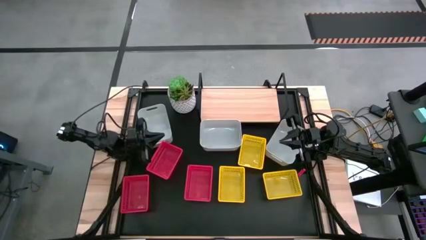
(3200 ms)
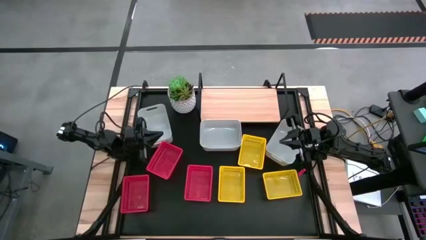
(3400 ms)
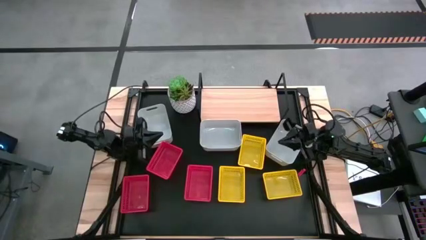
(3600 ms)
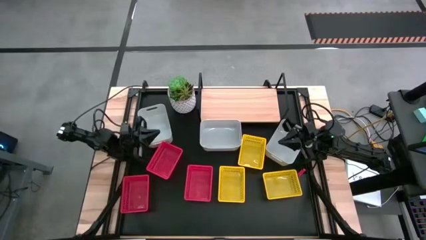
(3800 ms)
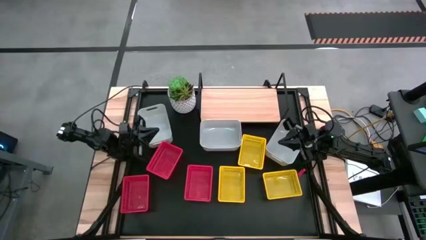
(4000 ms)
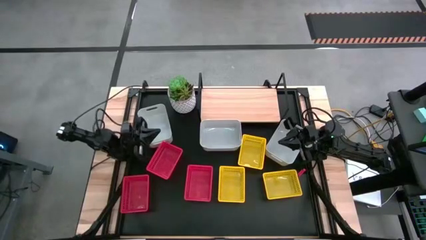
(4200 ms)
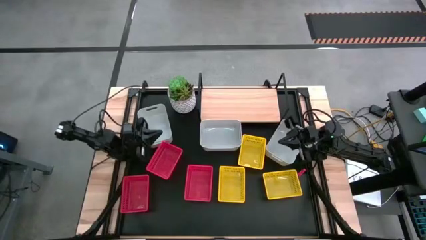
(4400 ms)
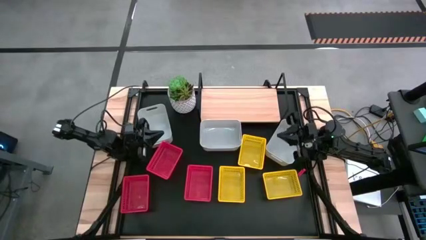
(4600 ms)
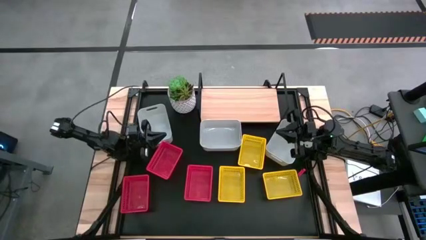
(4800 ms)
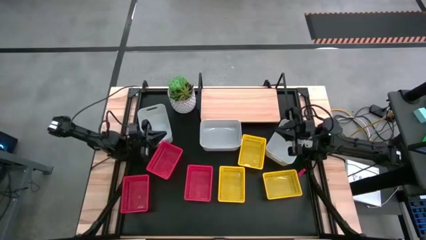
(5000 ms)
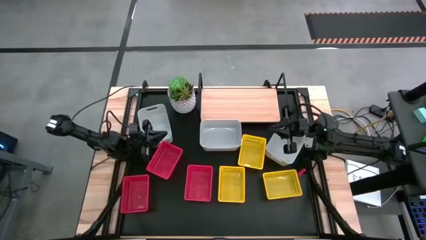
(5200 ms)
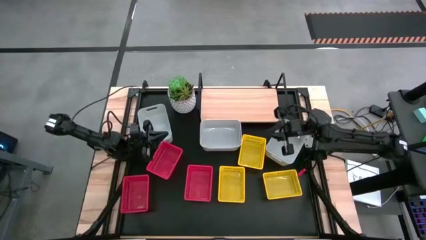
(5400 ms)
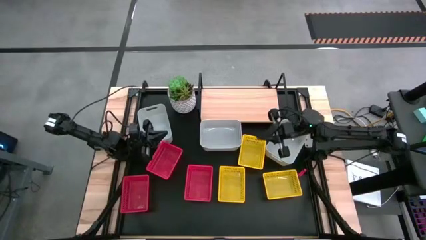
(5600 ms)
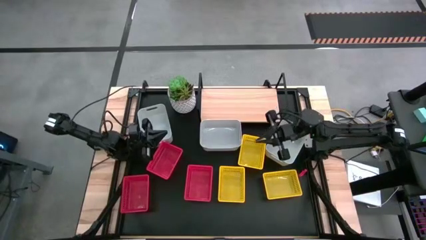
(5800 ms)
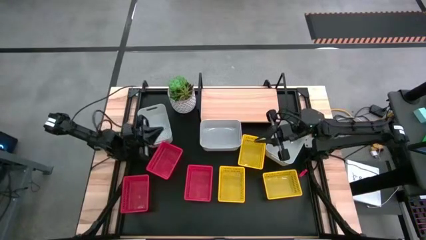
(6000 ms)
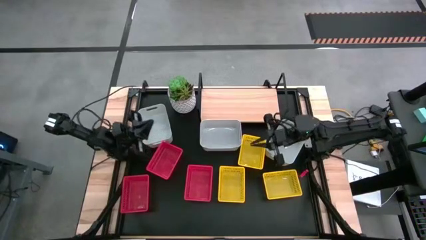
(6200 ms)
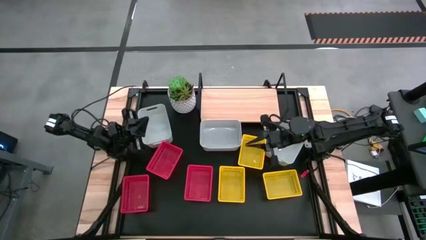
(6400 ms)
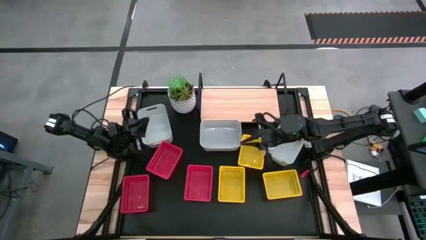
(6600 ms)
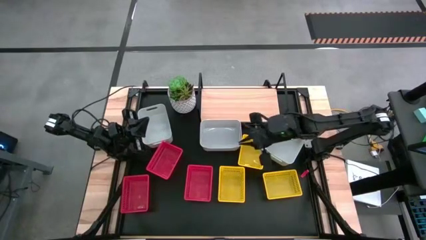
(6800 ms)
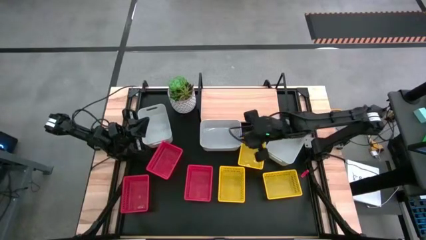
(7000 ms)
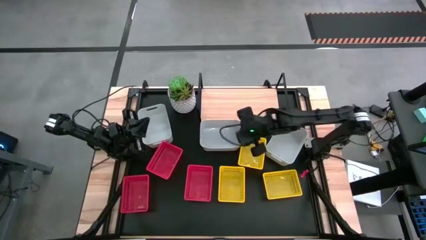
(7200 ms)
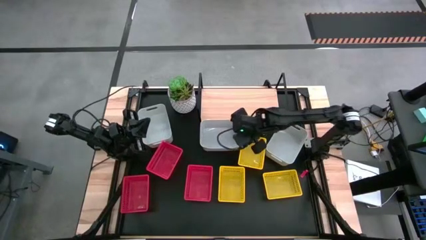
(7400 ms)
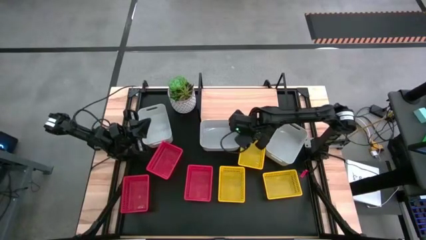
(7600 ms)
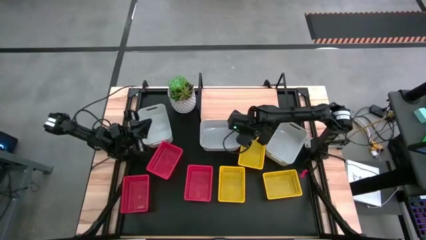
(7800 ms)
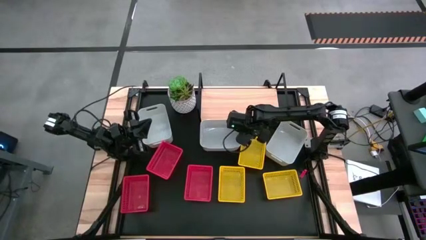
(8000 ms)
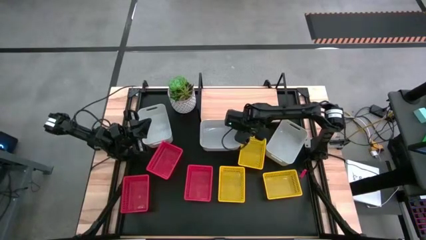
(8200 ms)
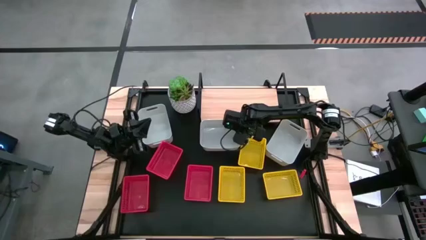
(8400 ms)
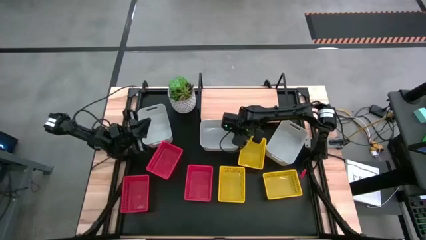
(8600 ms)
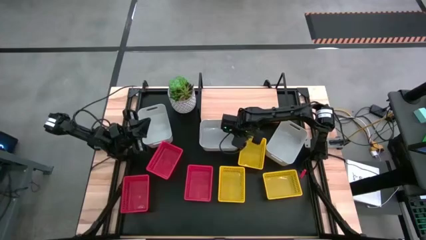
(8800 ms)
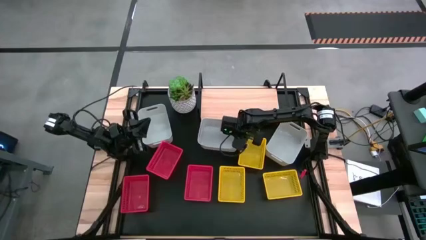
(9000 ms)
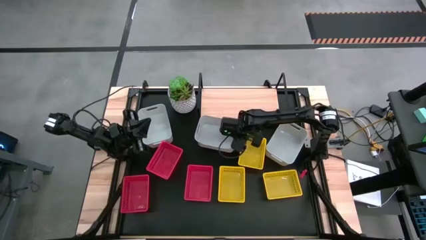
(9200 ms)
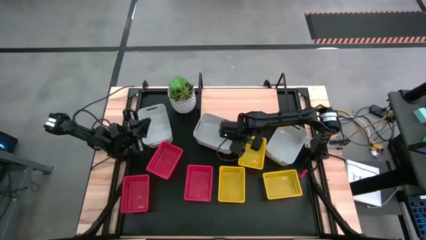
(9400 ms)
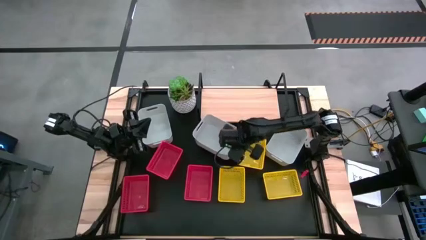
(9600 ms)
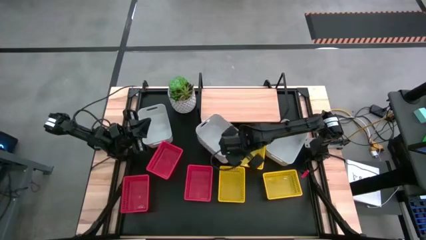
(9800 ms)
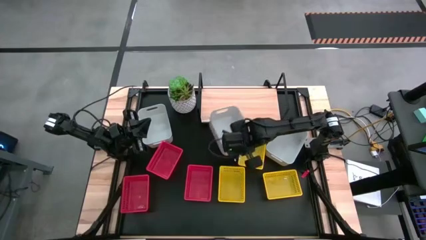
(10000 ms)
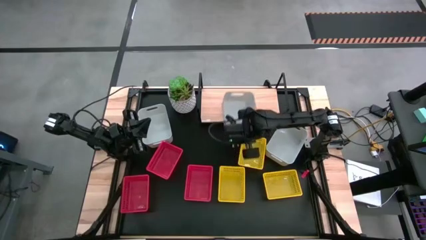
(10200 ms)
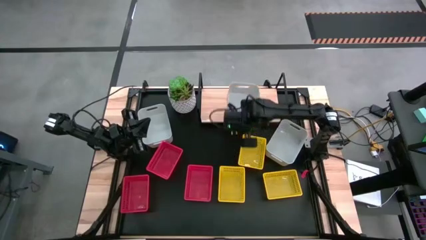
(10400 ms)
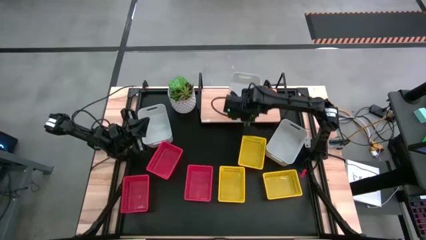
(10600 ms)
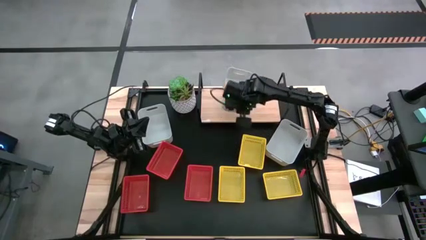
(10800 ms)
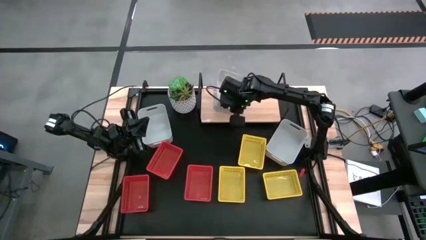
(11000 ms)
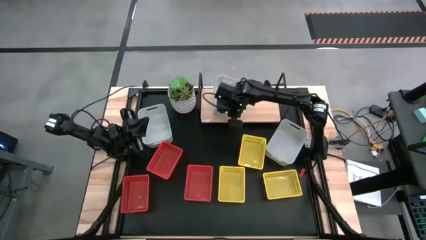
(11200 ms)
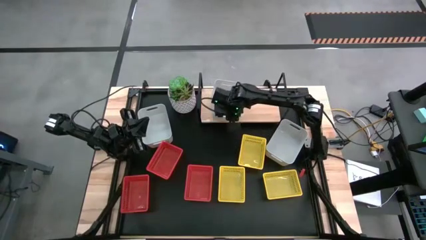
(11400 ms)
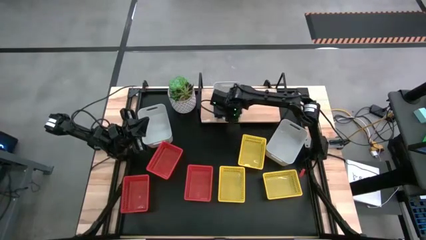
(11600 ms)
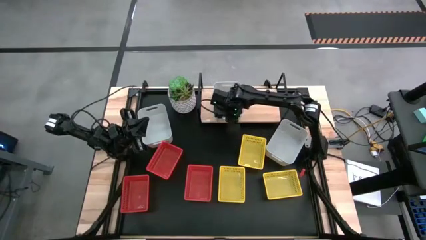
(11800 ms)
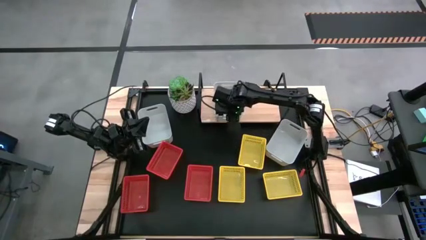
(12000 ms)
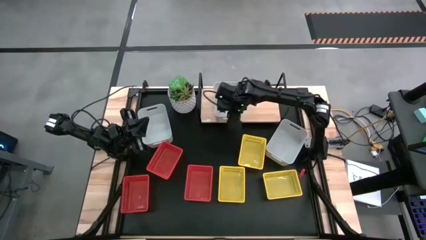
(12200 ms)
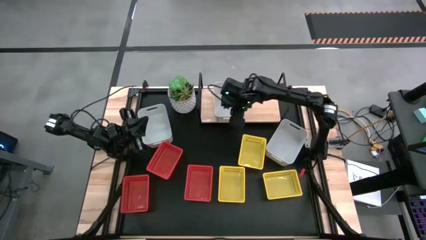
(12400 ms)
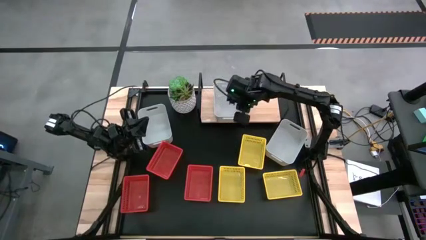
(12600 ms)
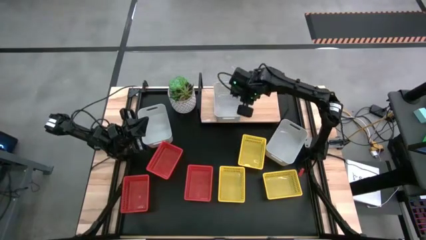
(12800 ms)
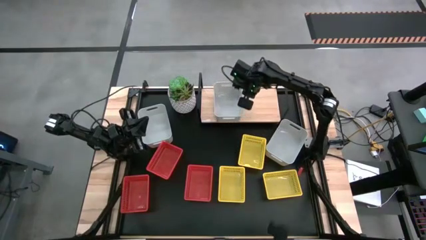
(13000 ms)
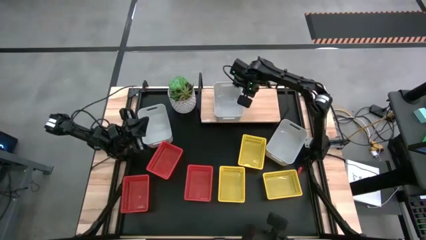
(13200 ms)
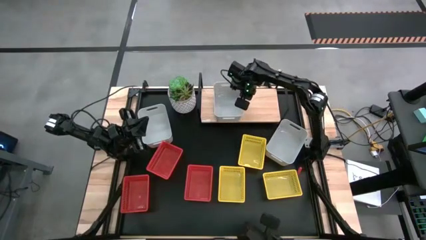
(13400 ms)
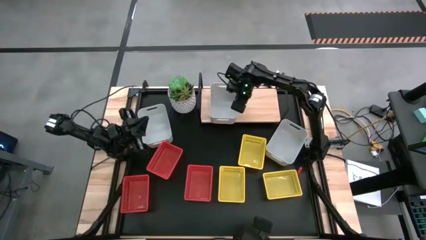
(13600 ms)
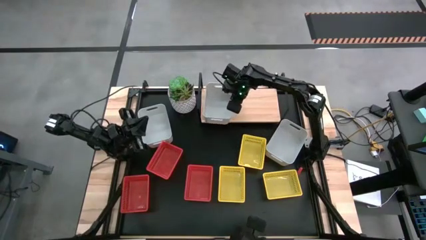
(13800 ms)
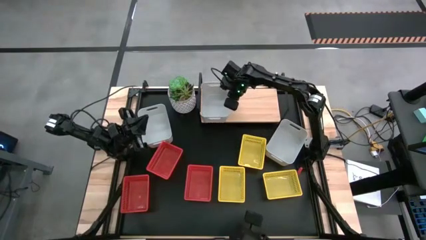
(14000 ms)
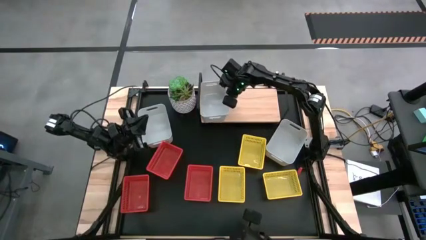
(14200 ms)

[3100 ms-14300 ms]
Task: Stack baskets on shelf by color
Put the middle gray bin on the shelf

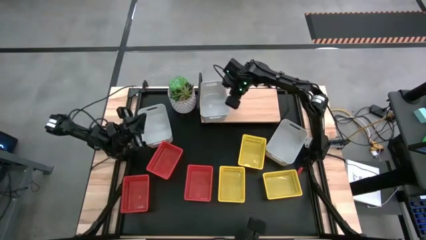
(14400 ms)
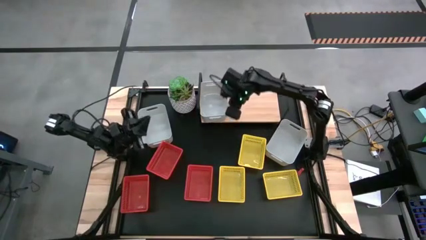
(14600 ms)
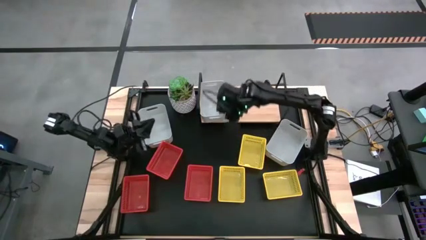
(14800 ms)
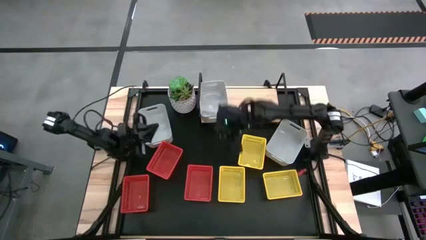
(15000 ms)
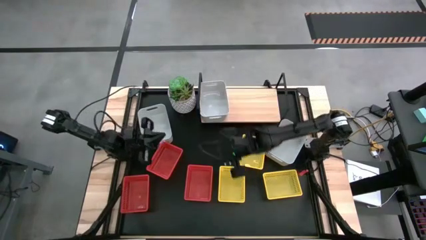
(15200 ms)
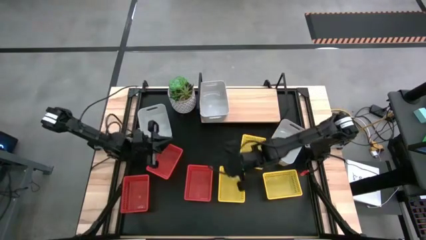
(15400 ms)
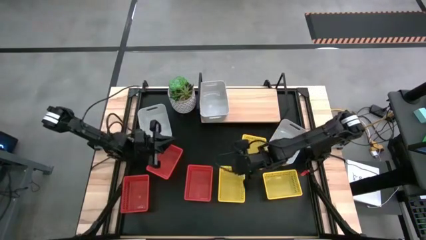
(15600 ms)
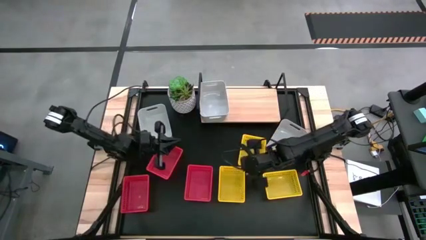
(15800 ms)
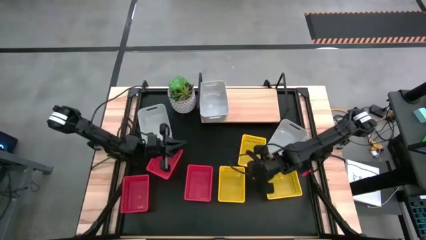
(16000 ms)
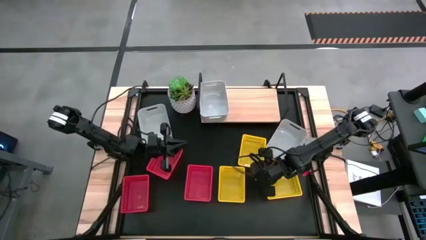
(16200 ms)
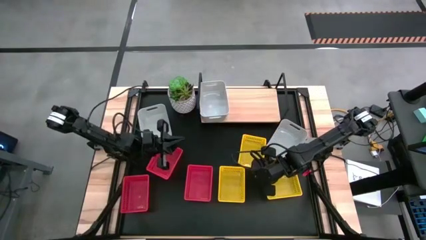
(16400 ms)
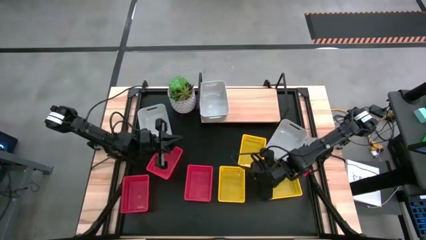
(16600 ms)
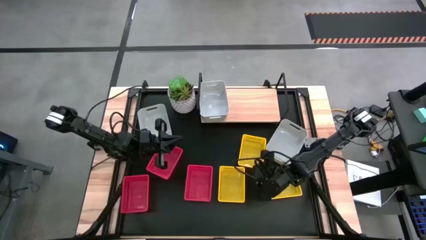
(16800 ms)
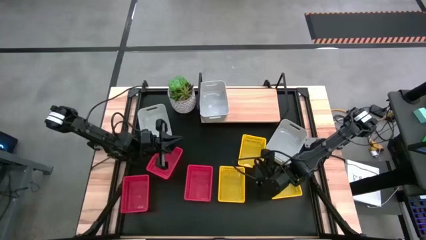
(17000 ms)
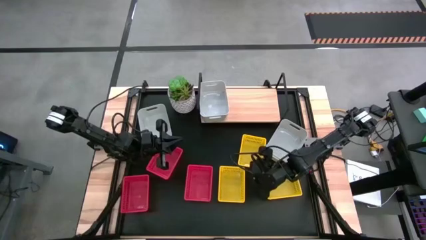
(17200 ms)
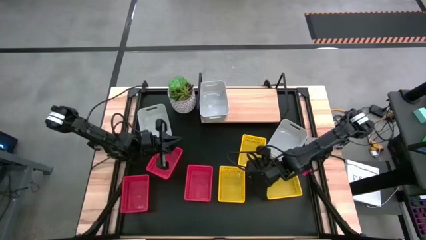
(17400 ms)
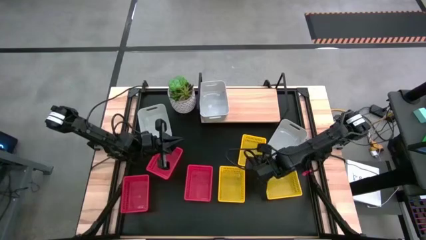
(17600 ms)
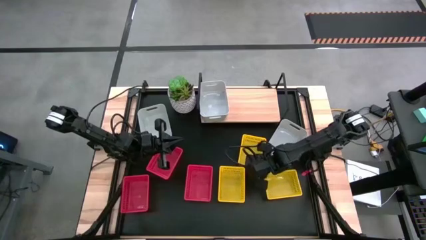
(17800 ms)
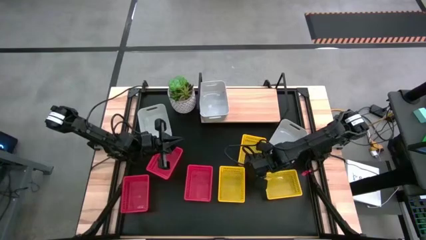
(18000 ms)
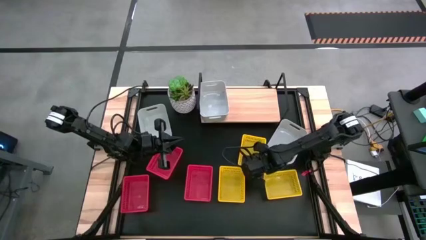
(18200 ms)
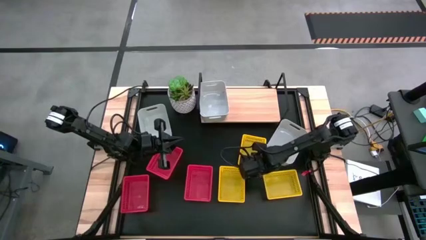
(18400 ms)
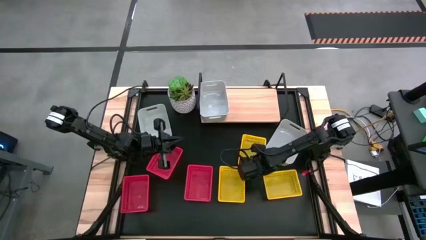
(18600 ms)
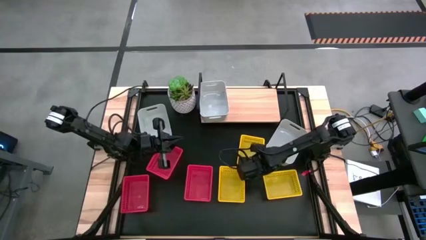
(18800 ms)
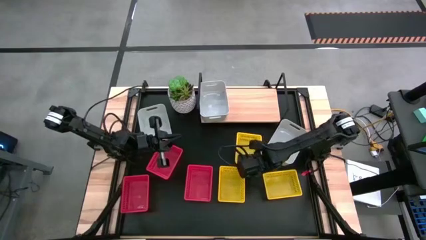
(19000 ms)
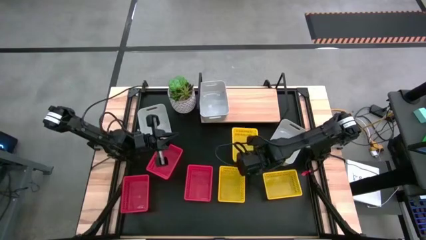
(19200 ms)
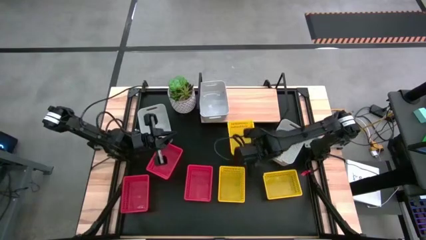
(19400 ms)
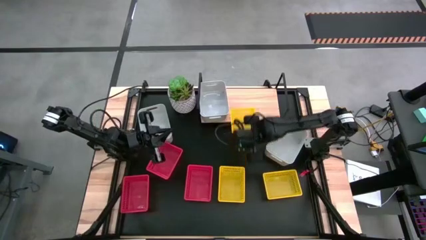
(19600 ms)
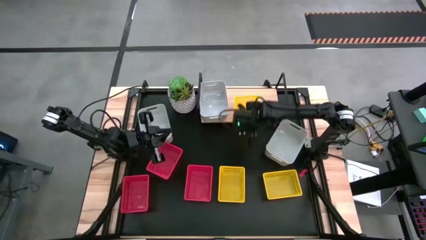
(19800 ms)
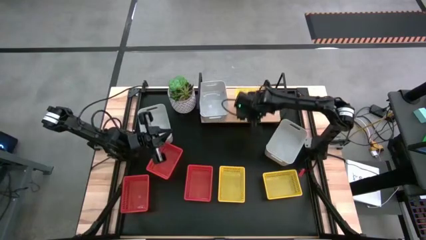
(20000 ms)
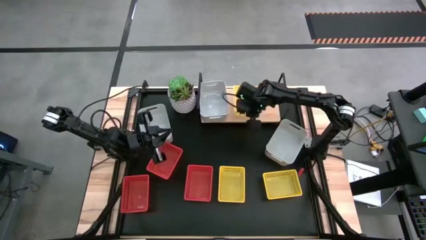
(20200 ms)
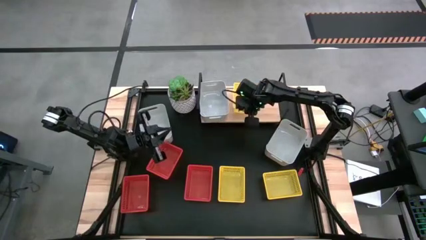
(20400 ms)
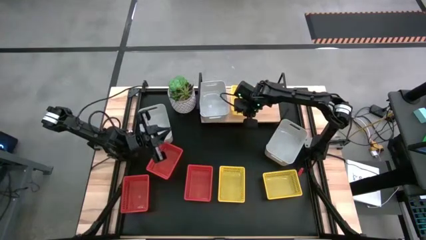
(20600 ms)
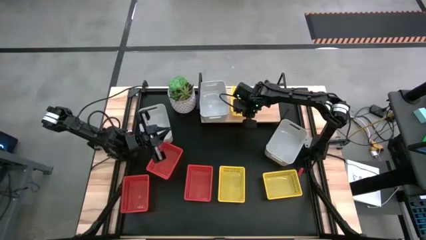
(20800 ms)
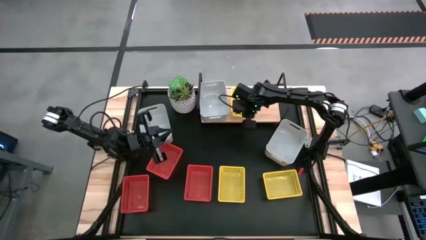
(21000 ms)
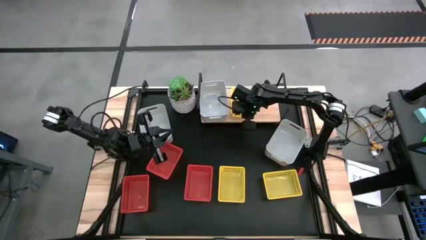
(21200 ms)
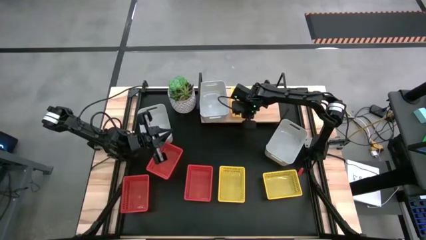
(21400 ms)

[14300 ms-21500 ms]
Put the top yellow bin on the shelf
